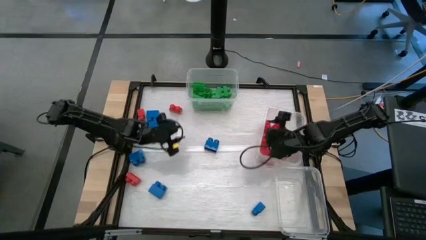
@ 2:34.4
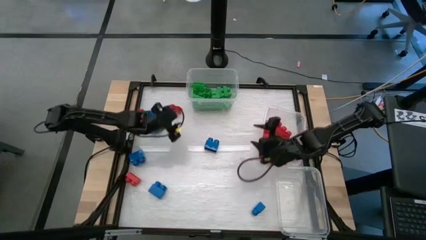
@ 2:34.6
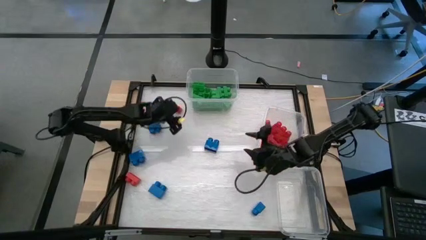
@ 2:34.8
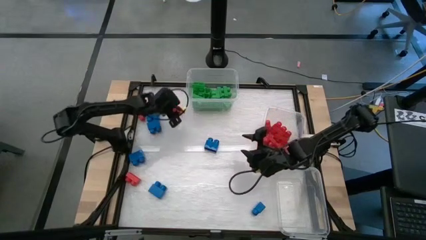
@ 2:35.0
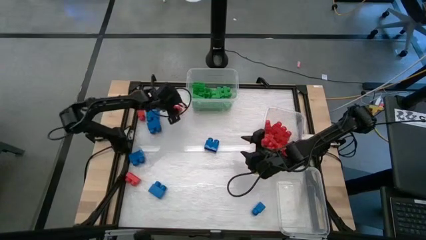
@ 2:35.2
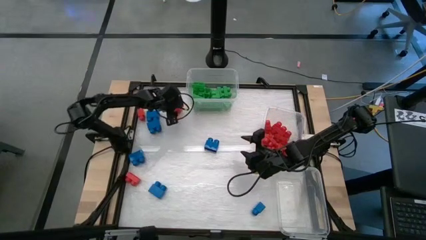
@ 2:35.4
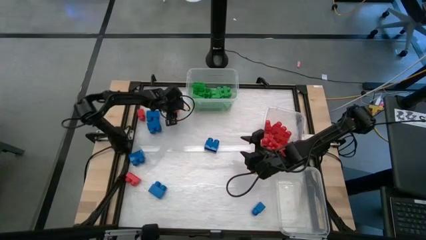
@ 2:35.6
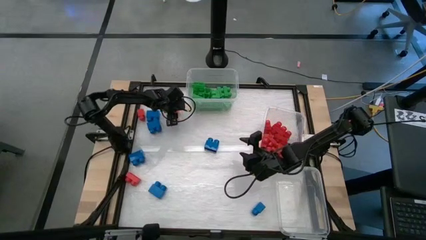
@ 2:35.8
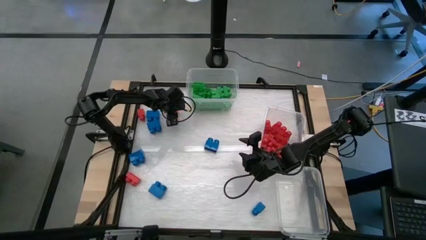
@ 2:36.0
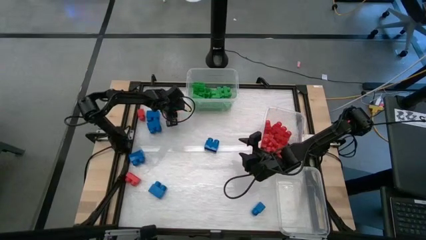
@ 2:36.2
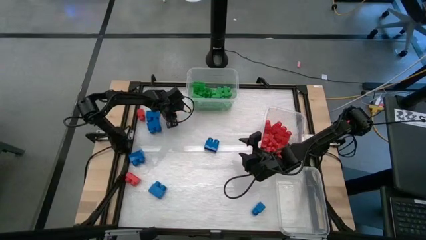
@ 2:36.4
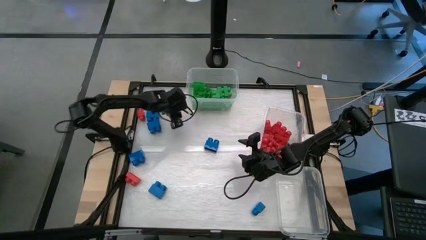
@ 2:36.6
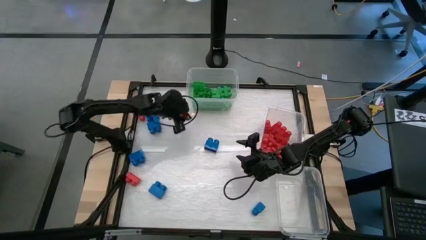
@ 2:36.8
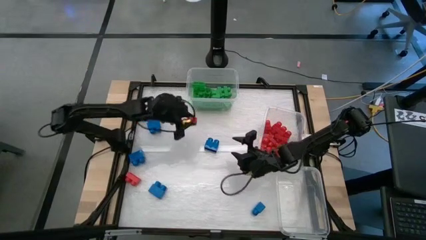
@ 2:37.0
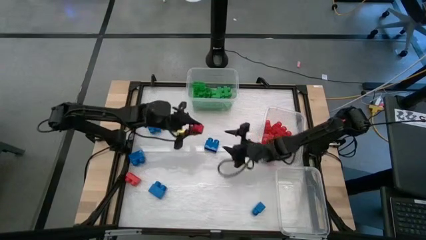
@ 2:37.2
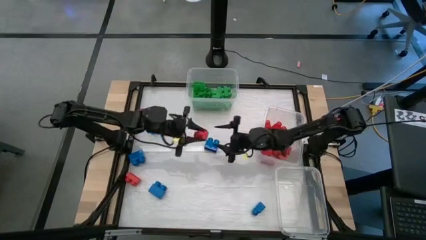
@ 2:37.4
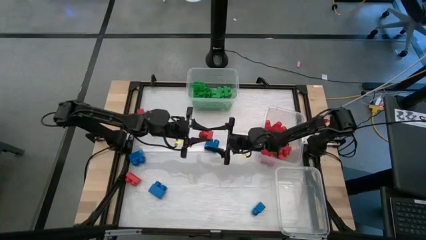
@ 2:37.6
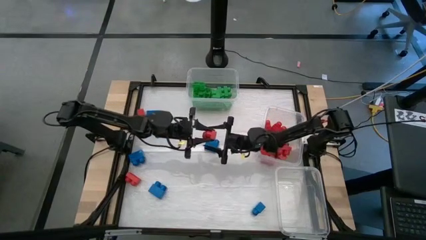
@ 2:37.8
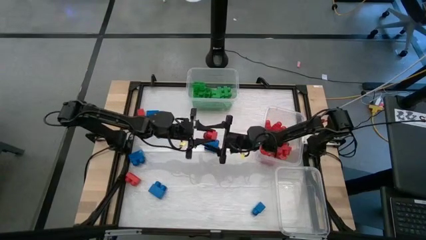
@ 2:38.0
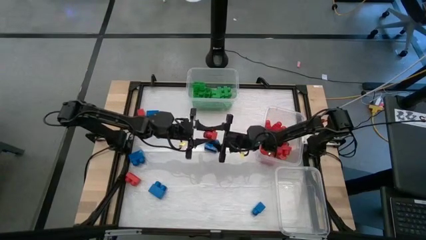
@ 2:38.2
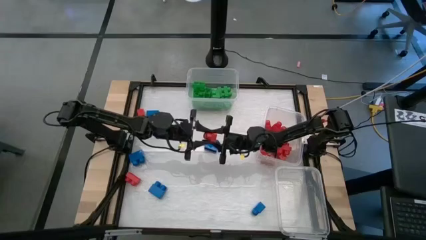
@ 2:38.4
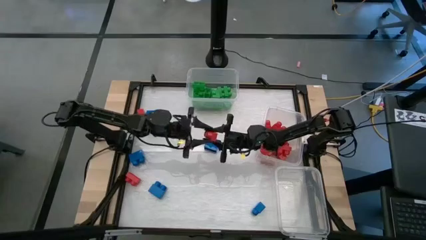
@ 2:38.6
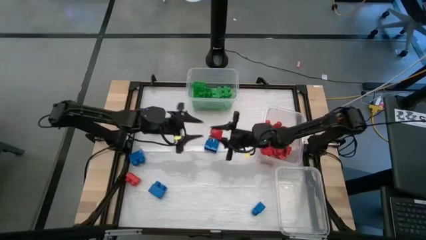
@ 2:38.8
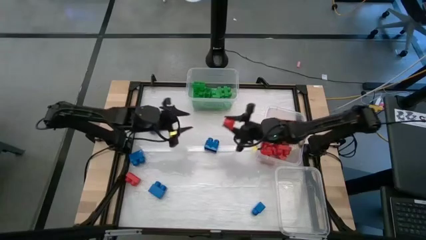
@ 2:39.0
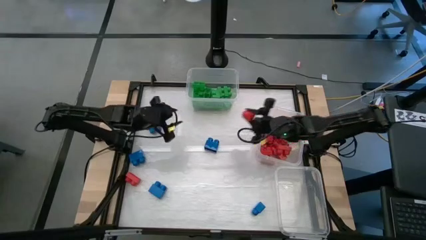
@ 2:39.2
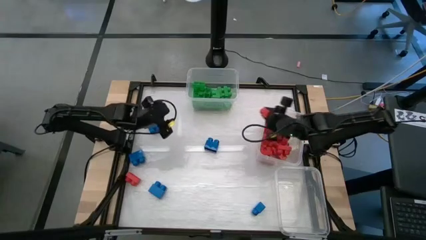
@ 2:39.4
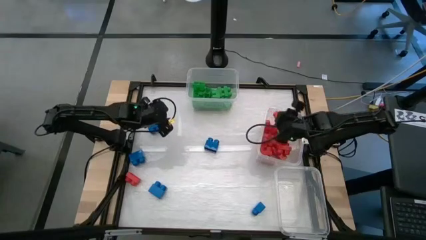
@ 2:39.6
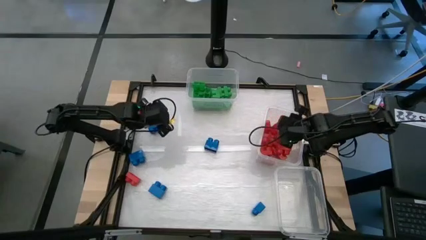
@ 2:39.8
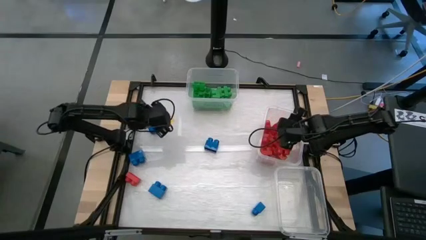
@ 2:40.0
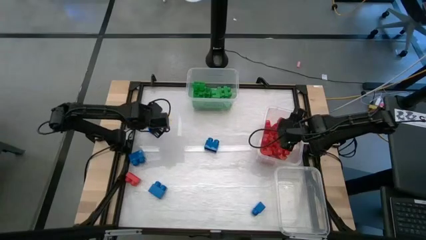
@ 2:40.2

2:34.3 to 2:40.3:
Task: Sort blocks
Put the red game piece into the middle right transparent bin

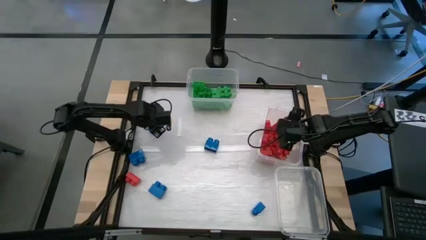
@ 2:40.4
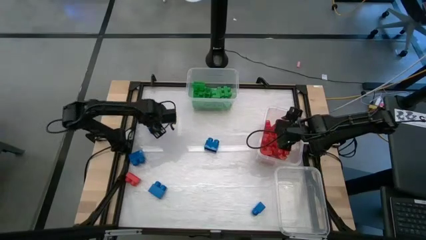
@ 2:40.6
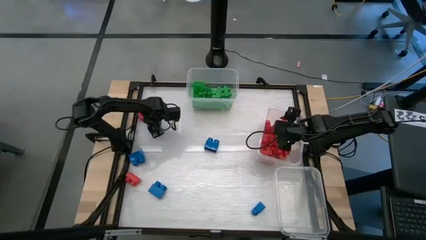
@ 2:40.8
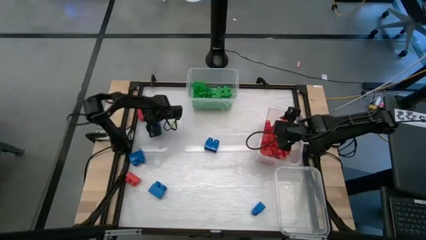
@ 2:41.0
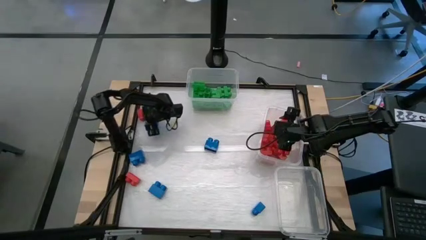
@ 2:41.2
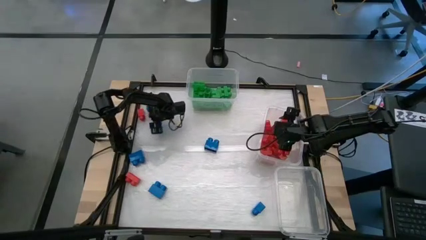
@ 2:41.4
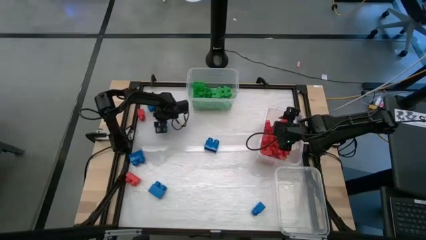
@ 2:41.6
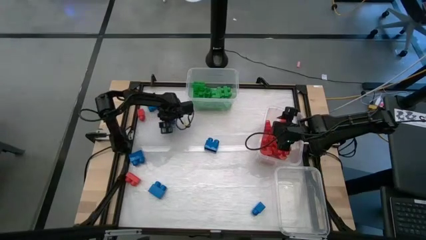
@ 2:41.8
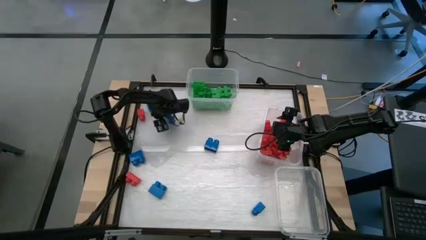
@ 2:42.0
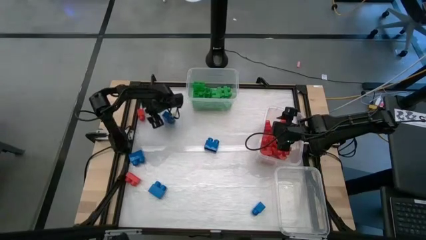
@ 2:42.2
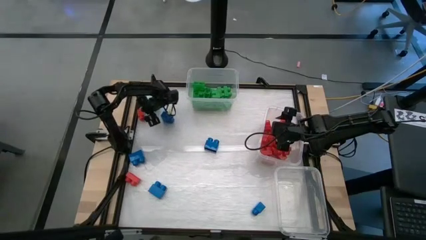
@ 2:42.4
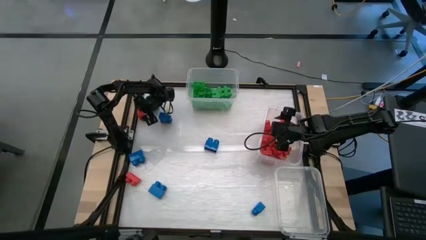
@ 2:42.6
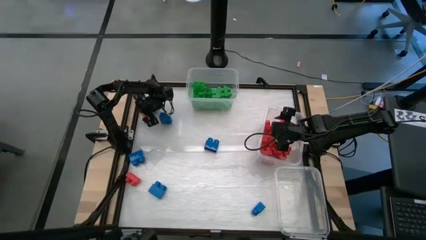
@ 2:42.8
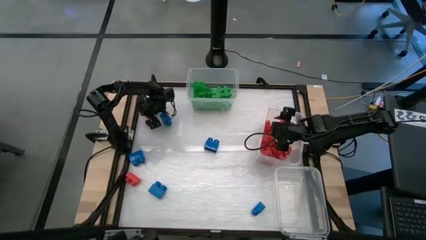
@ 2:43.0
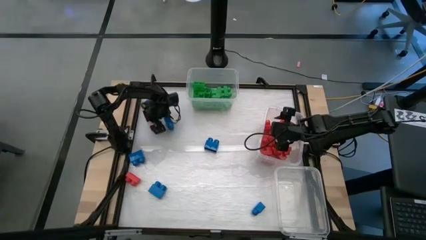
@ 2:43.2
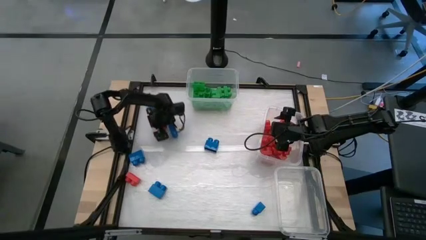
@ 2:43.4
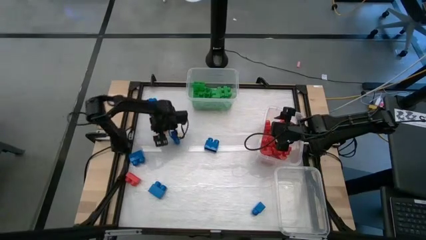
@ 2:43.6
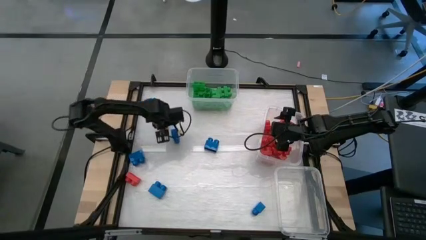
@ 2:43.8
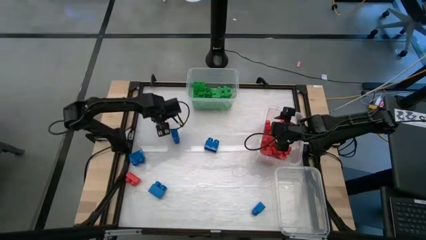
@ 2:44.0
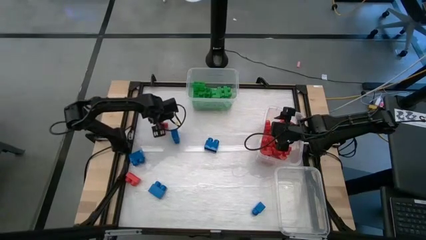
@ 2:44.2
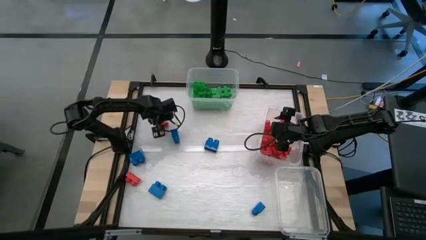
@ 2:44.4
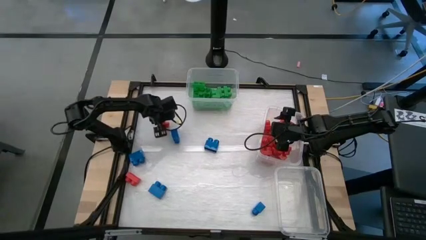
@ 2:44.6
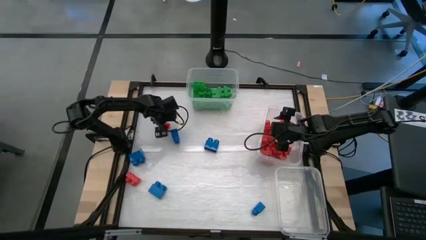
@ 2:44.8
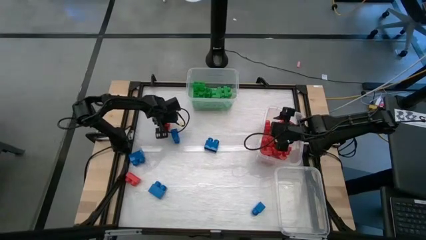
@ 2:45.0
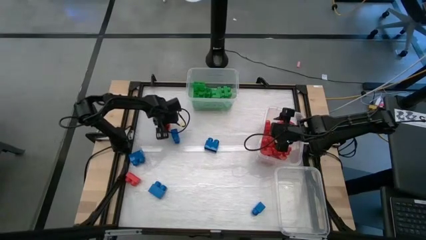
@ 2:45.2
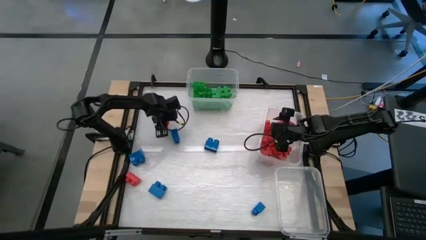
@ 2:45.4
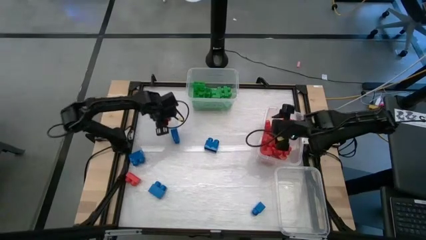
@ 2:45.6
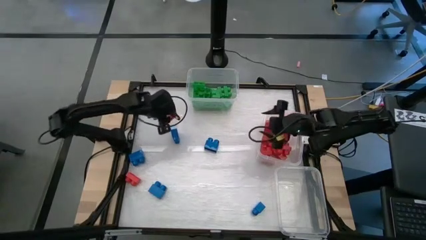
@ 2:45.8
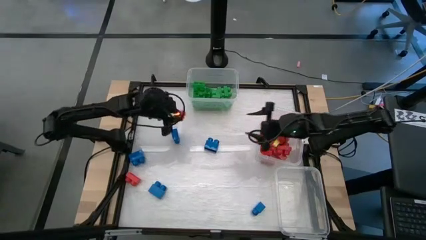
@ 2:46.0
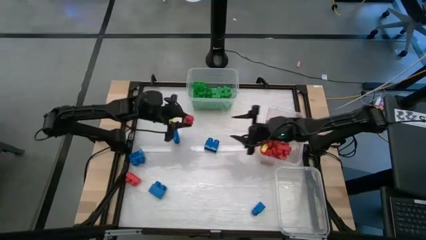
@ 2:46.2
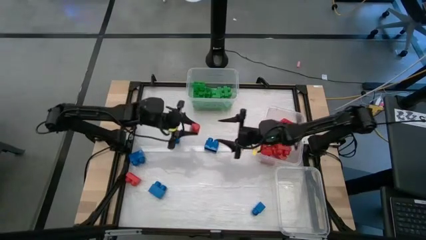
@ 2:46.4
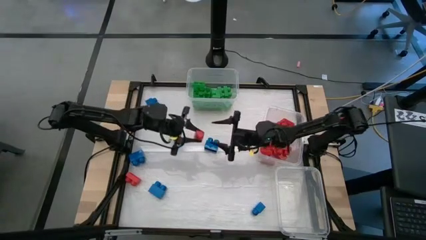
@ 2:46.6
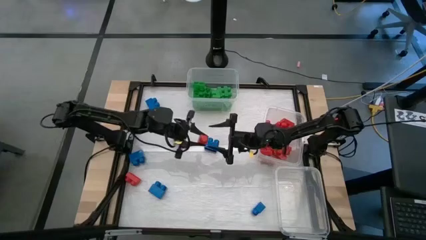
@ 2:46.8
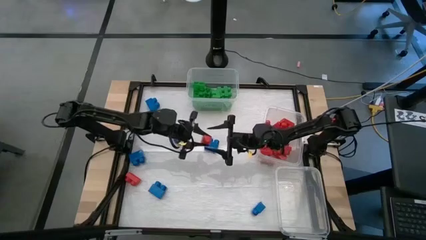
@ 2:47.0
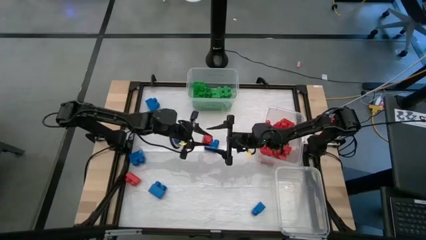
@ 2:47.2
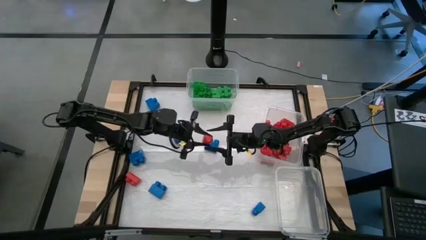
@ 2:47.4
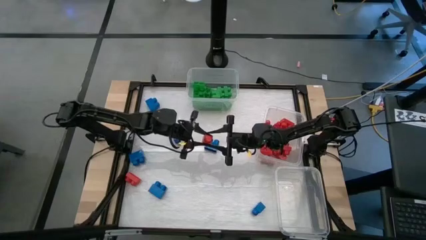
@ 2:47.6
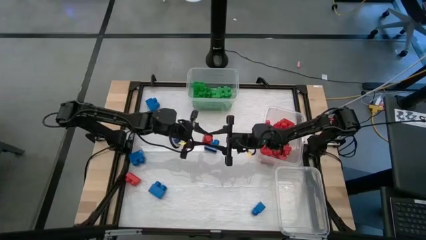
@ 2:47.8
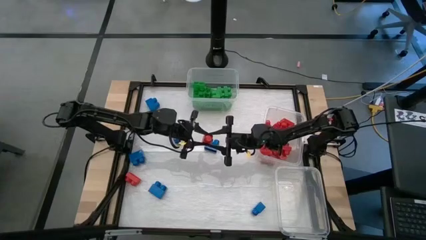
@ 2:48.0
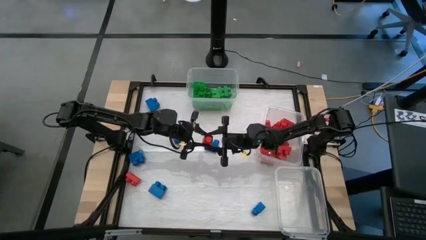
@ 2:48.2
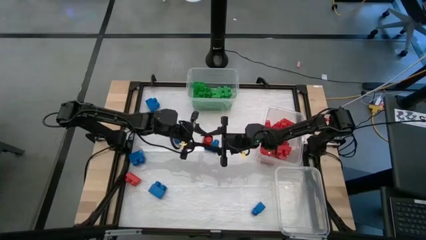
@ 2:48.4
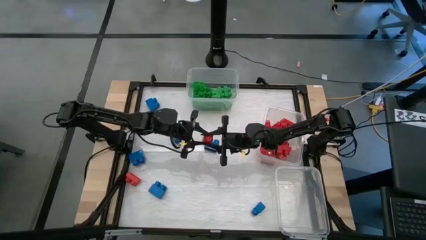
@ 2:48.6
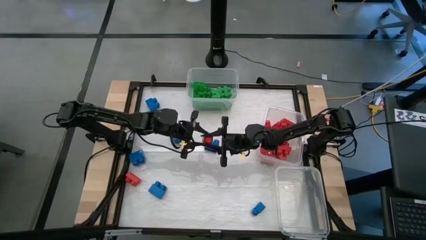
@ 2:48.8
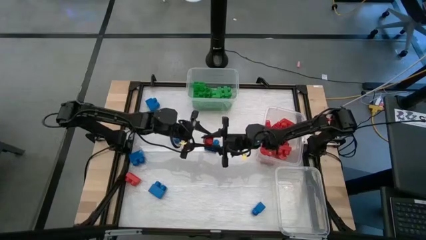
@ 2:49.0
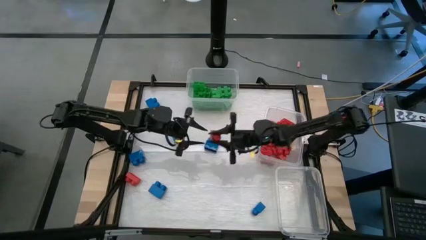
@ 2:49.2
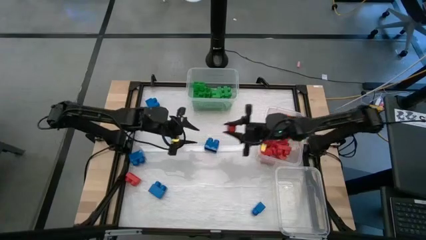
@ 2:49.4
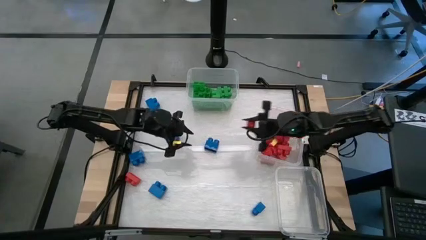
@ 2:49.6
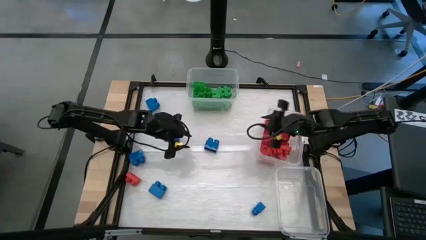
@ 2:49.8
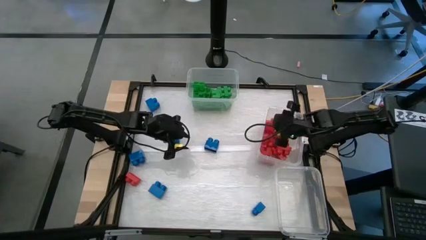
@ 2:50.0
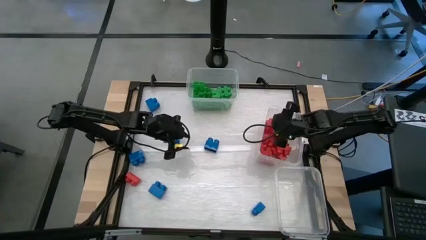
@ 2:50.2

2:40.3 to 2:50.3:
Put the red game piece into the middle right transparent bin
